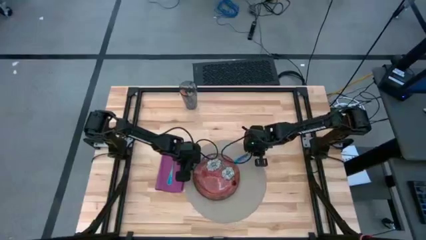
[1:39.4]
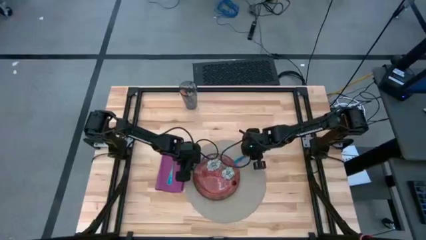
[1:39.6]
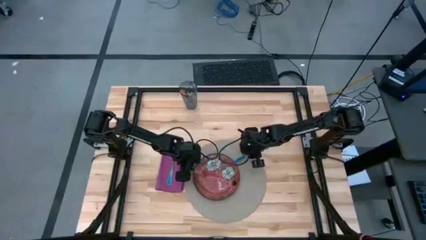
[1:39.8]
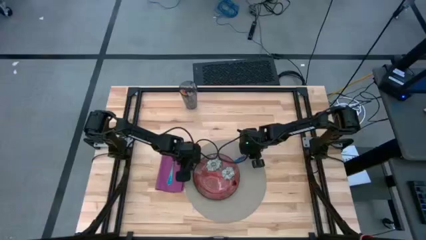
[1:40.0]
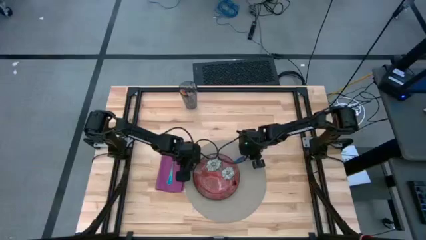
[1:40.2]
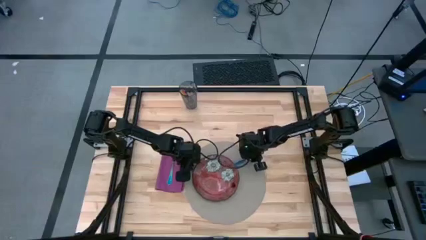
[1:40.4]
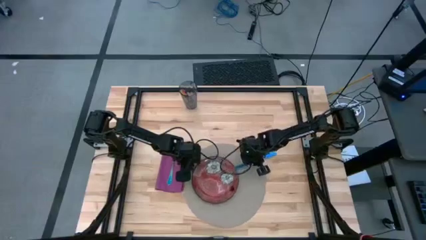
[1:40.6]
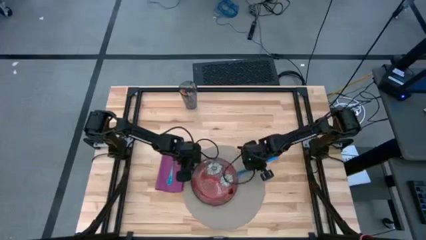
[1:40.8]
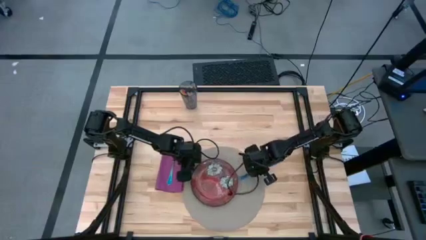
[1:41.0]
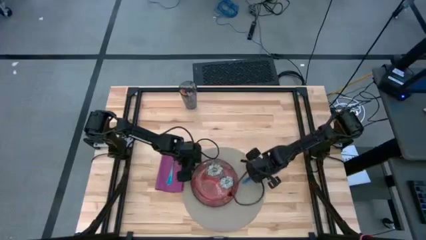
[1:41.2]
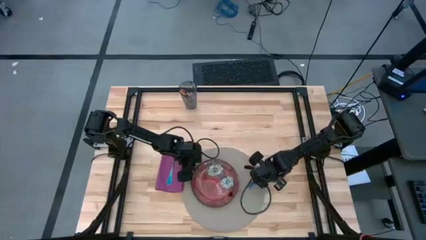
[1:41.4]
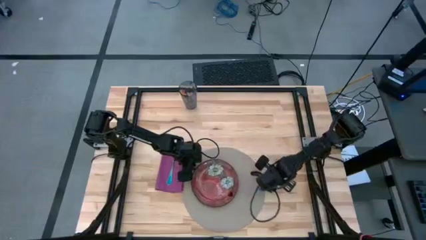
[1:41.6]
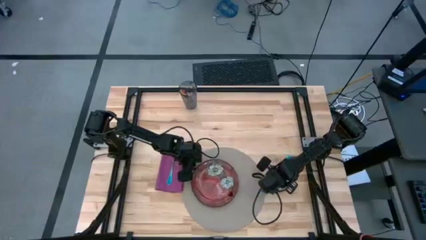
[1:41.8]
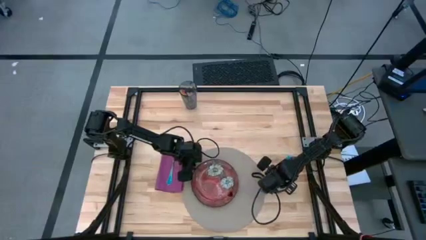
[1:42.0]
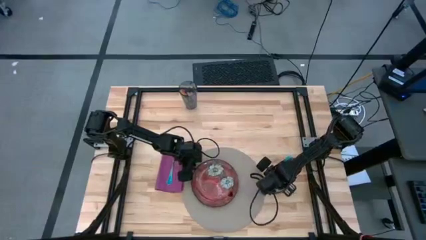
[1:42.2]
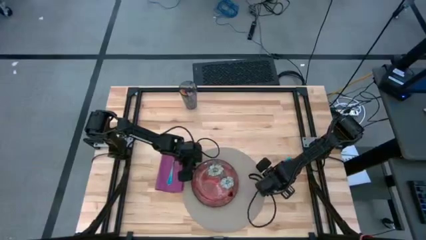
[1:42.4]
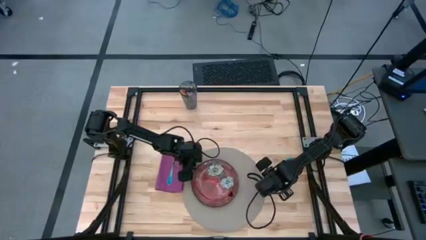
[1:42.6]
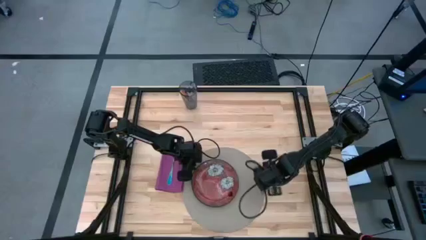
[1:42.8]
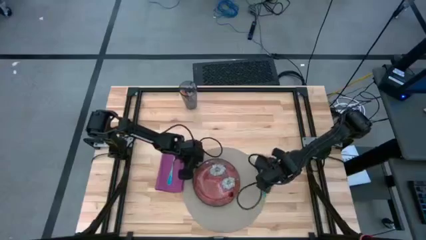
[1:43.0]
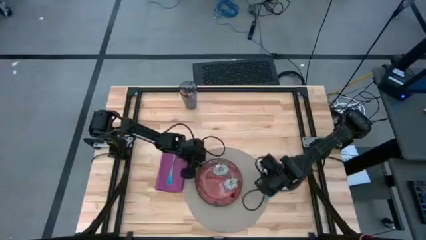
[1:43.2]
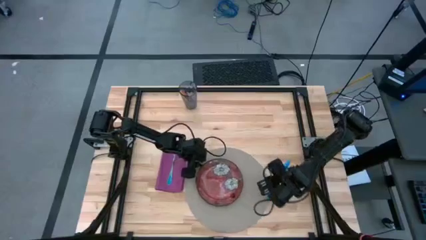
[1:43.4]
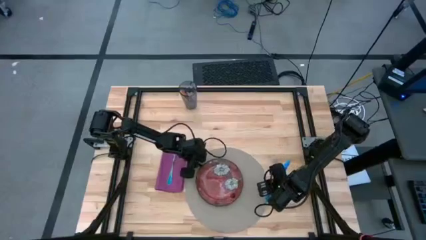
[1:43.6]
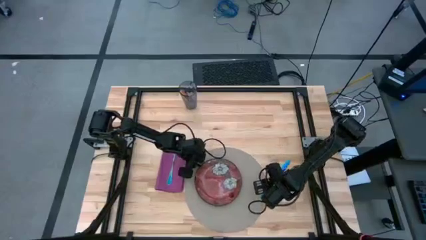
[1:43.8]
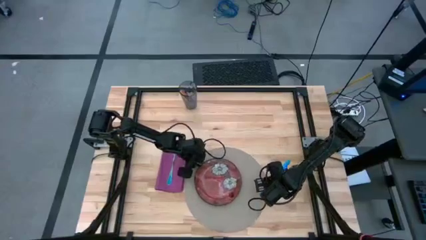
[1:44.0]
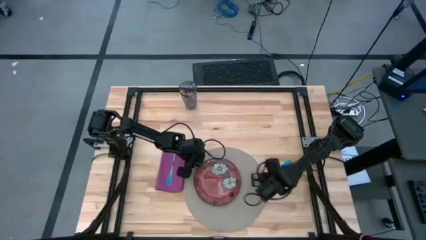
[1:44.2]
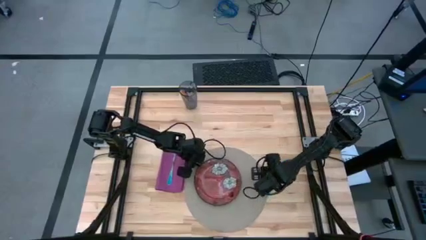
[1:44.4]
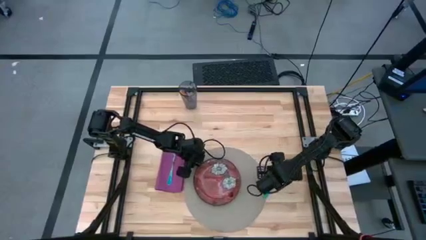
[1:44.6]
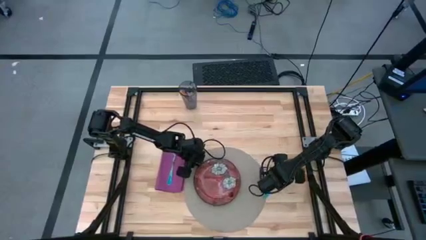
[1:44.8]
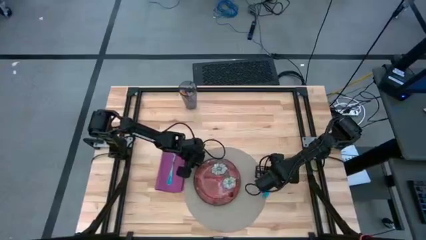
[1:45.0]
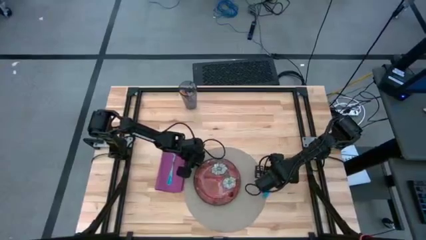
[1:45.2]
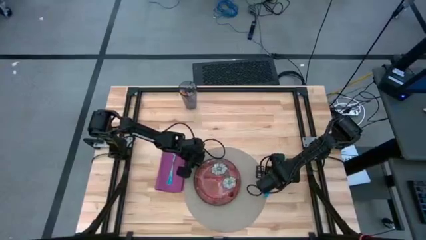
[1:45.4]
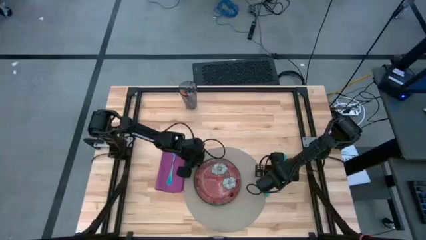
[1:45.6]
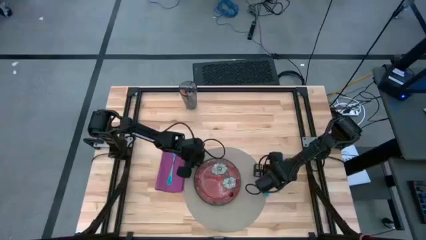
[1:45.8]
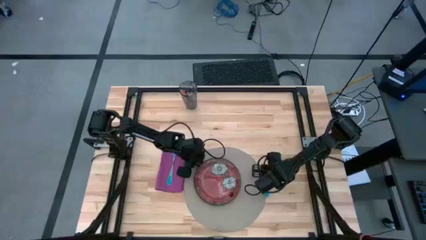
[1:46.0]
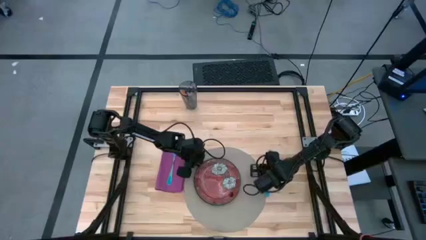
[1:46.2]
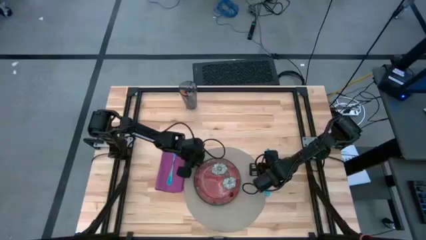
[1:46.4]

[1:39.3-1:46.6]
Task: Set table place
Put the blue knife on the middle right of the table

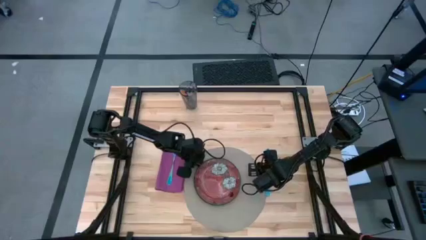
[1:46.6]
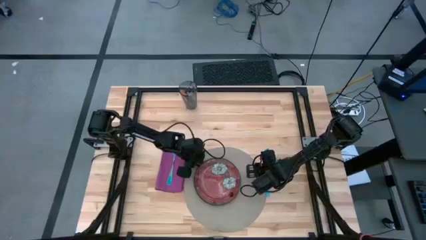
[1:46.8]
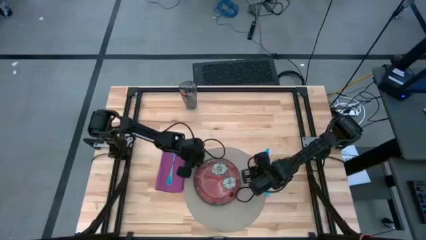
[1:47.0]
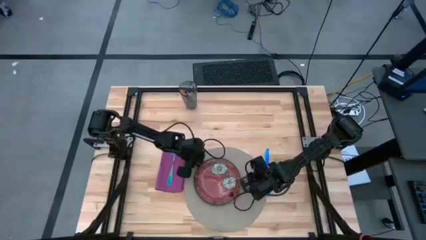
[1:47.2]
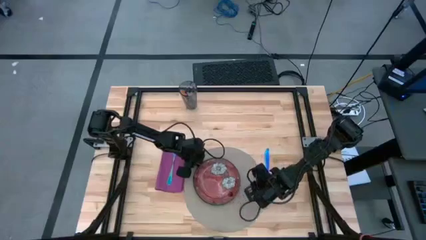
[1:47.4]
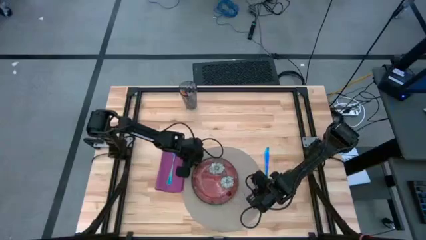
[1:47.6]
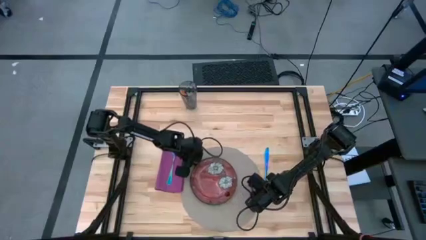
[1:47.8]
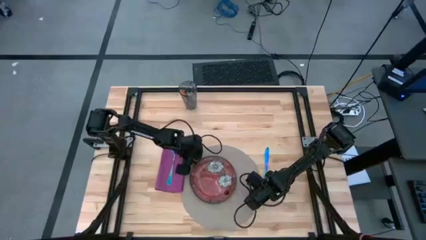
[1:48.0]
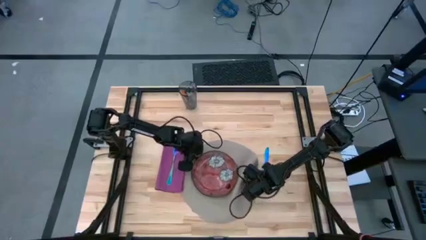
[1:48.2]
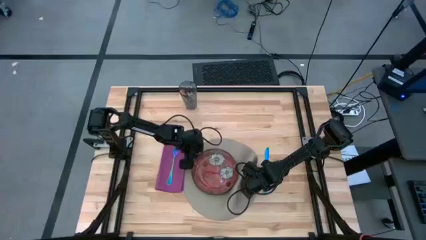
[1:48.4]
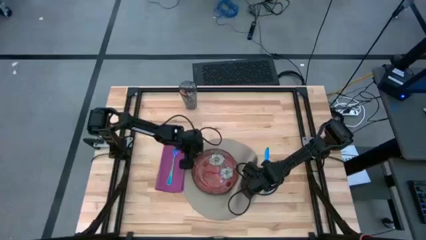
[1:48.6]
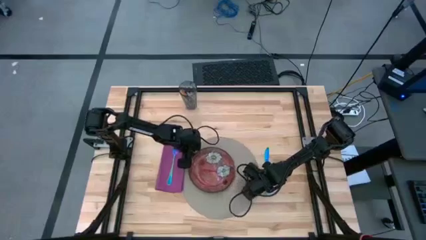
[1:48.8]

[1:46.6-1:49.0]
Adjust the gray table mat

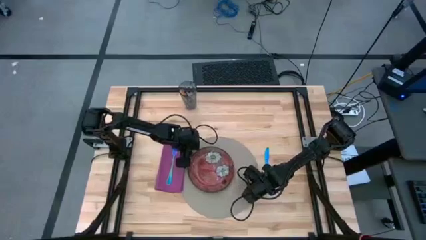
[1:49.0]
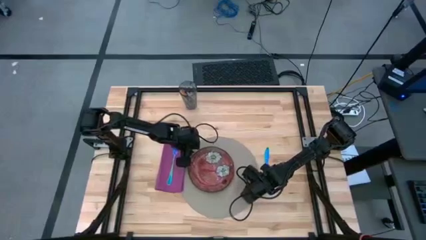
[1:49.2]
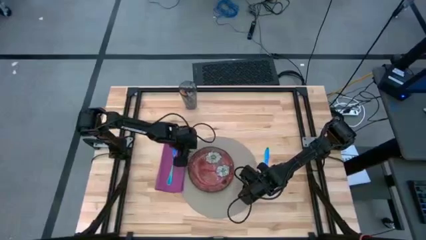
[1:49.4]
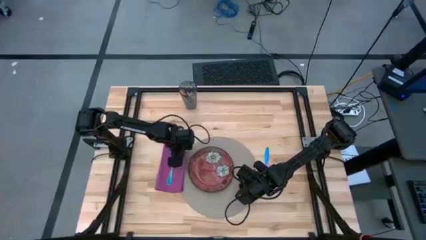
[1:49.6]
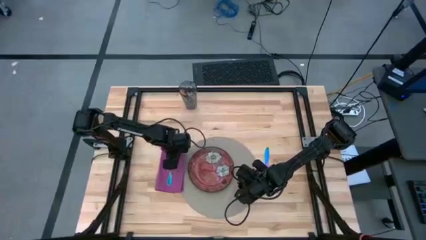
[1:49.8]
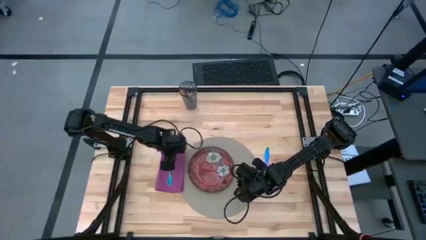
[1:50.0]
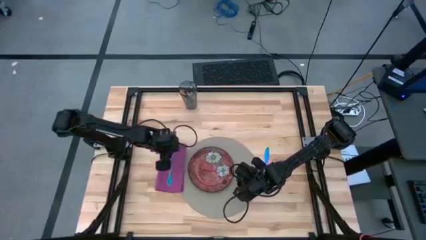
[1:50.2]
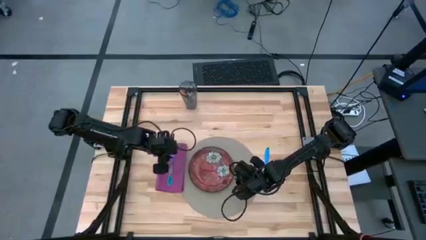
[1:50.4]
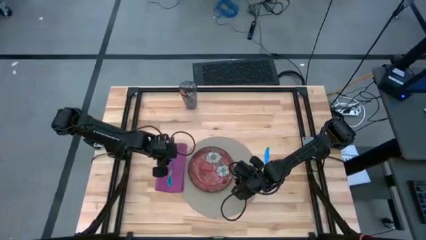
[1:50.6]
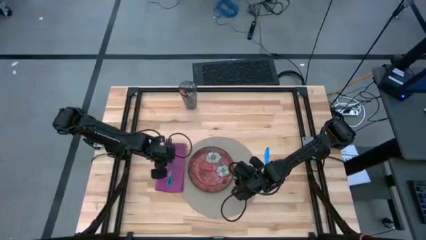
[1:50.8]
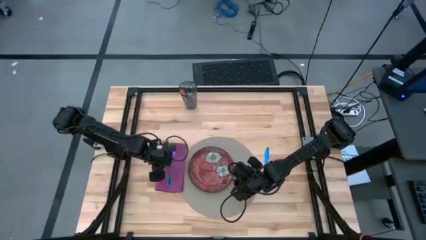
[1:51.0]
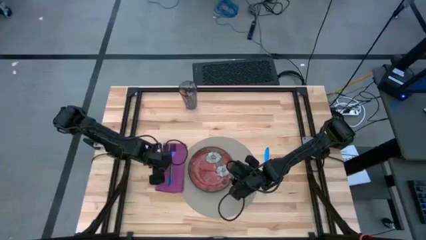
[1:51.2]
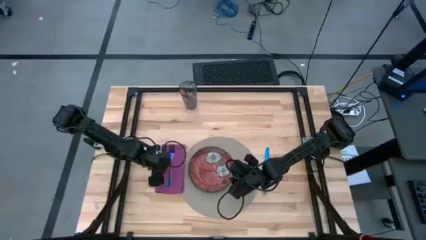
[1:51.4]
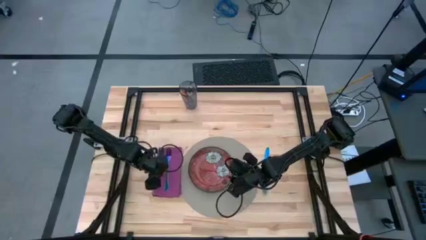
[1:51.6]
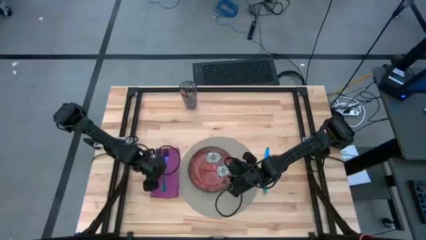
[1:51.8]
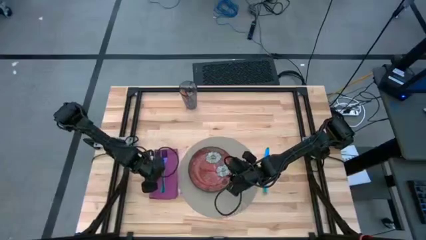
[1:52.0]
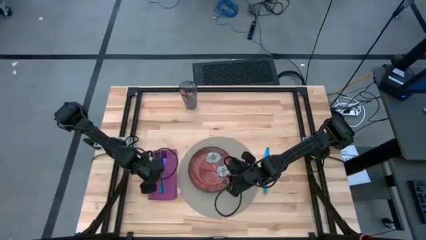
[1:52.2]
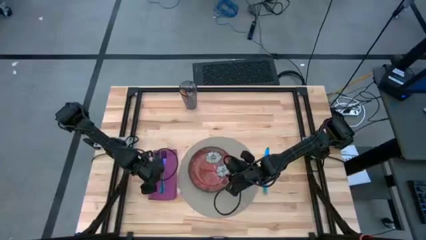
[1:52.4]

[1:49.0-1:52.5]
Adjust the pink napkin

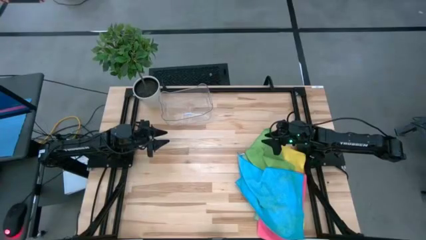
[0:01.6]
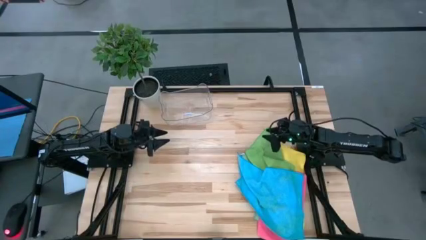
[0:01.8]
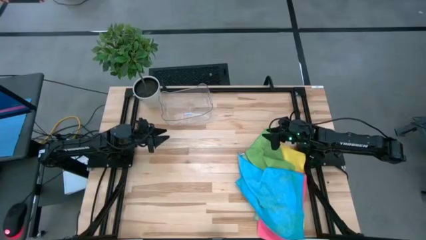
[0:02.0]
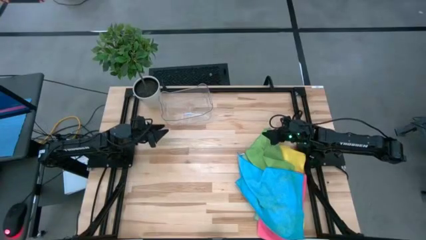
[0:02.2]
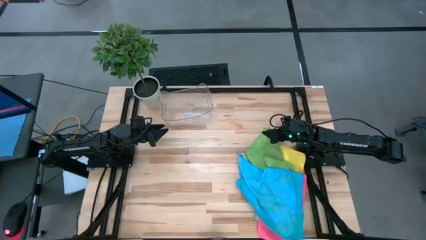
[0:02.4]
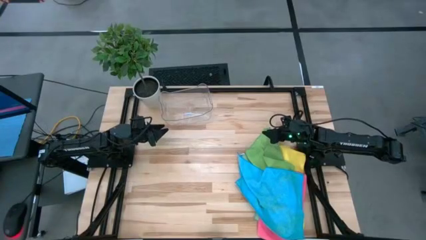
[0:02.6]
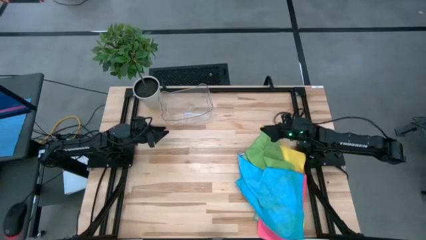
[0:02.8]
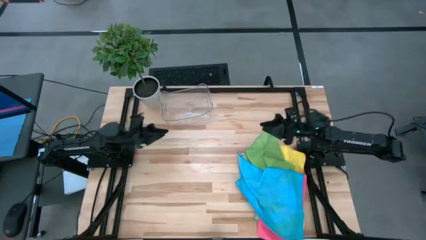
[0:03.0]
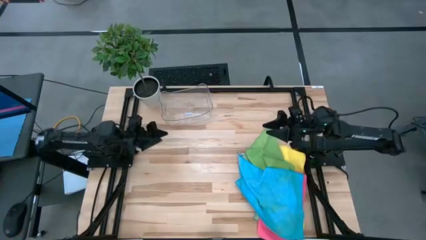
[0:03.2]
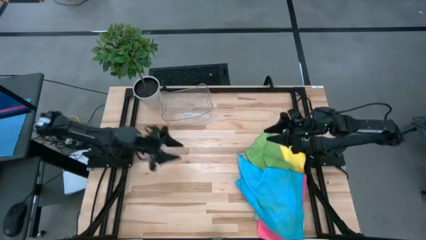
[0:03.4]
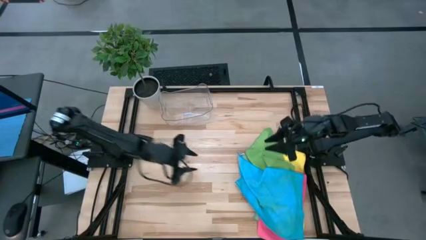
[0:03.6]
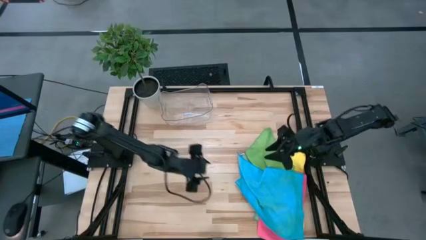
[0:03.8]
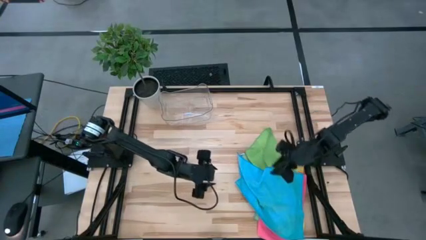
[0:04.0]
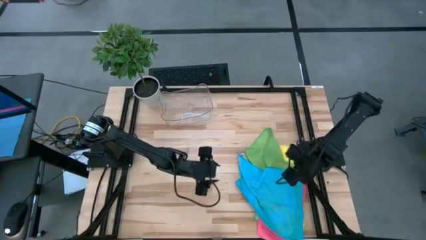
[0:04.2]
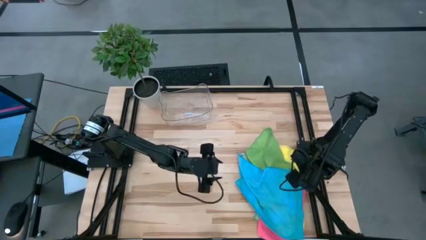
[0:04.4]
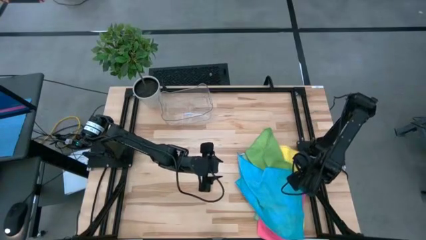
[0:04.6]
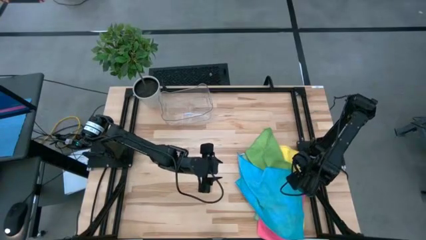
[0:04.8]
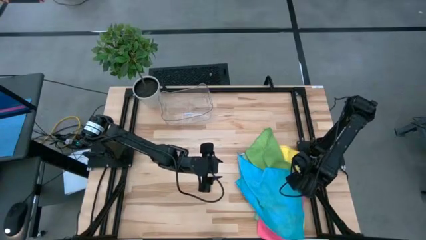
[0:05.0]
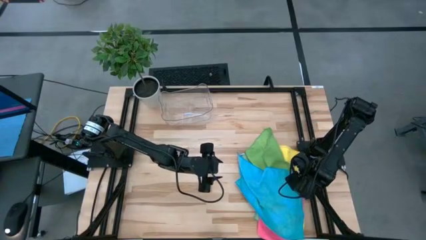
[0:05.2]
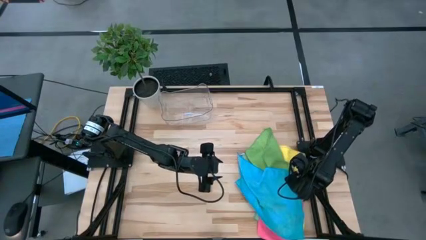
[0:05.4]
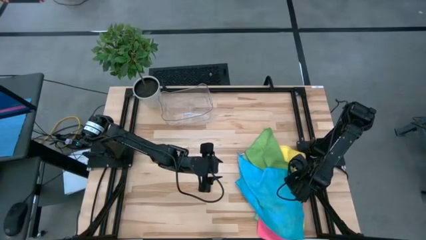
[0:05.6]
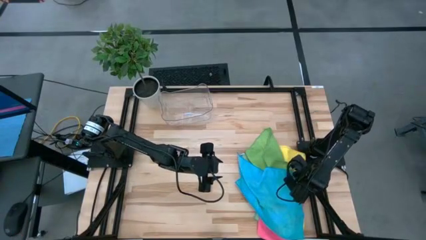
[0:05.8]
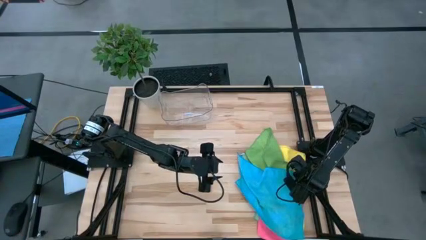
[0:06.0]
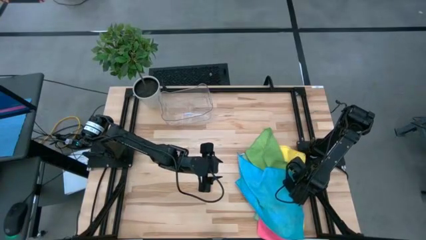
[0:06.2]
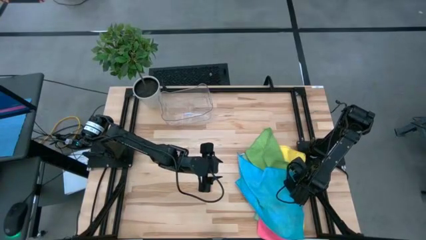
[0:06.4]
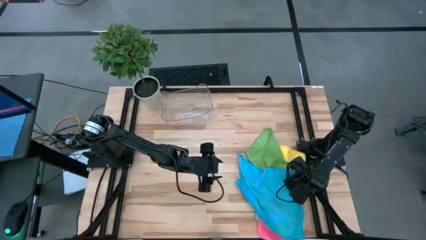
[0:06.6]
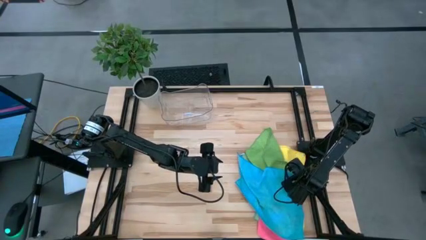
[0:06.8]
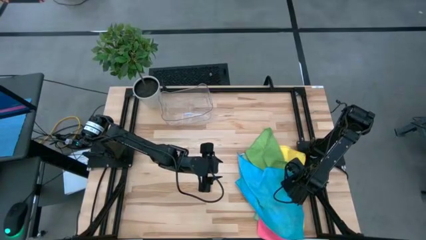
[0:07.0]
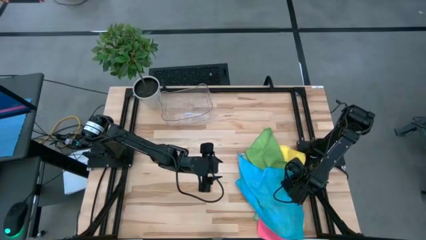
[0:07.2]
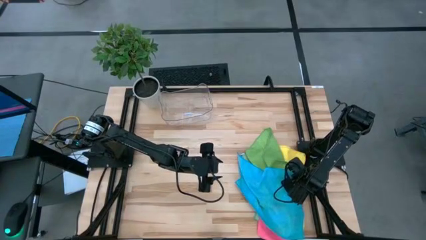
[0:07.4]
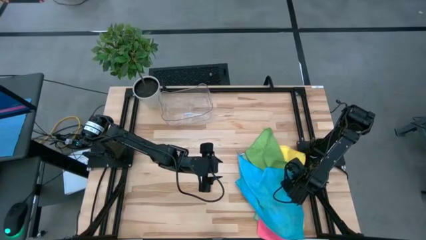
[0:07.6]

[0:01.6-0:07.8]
Task: Fold microfiber towels
Fold the blue microfiber cloth
